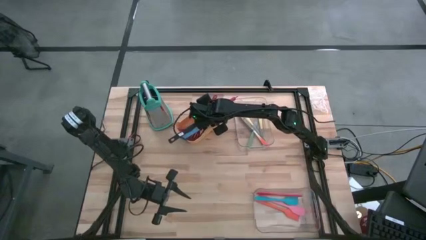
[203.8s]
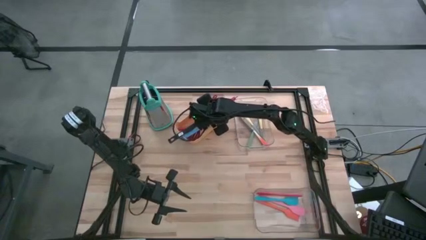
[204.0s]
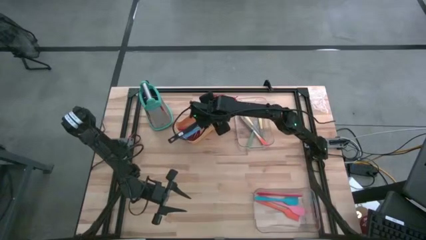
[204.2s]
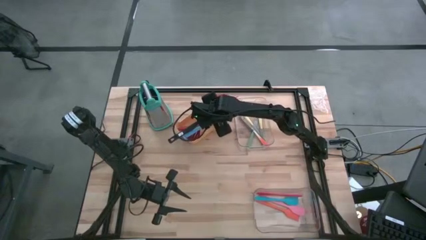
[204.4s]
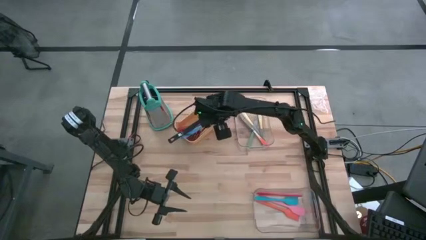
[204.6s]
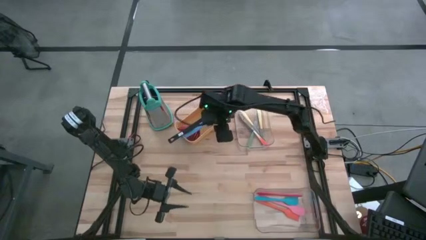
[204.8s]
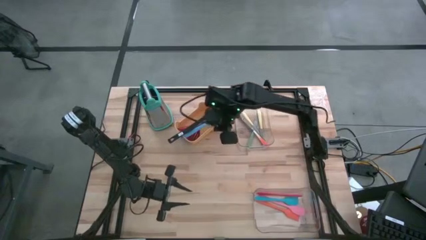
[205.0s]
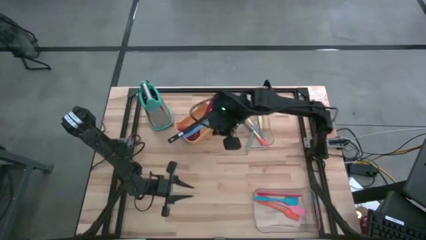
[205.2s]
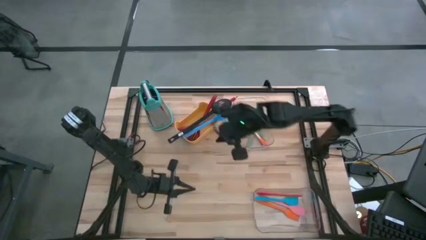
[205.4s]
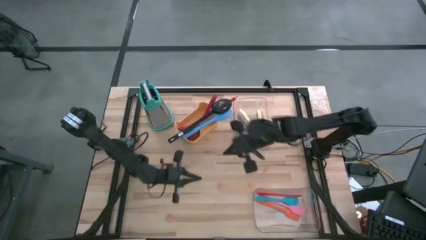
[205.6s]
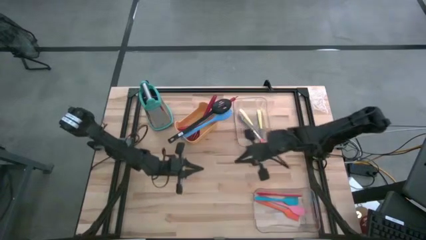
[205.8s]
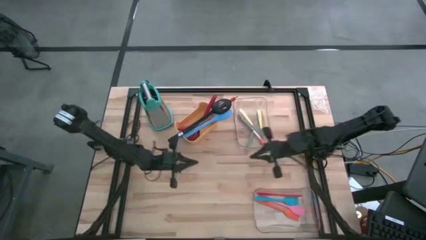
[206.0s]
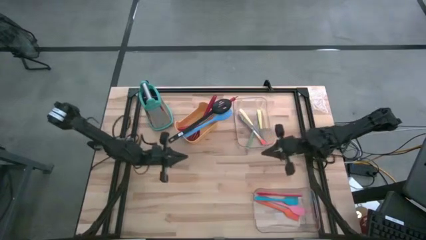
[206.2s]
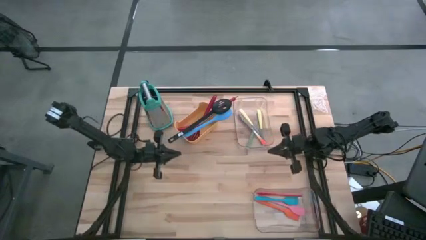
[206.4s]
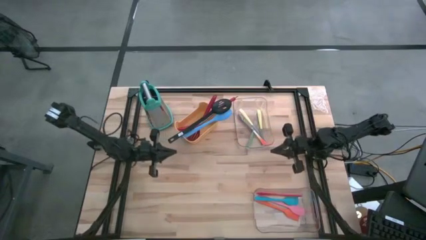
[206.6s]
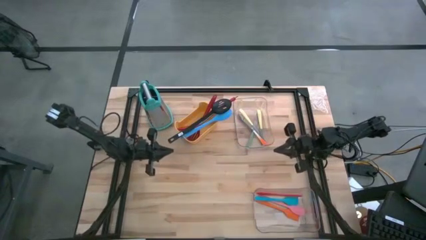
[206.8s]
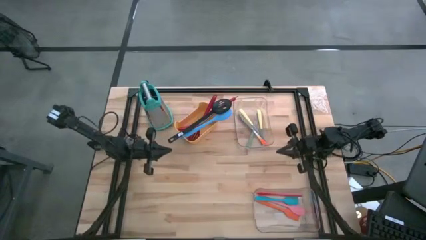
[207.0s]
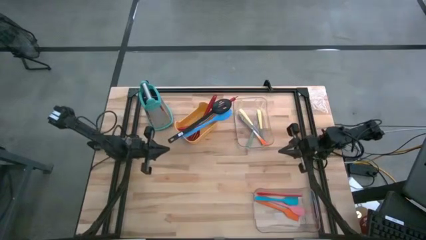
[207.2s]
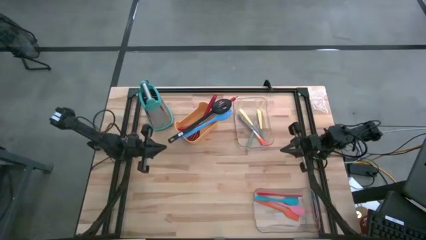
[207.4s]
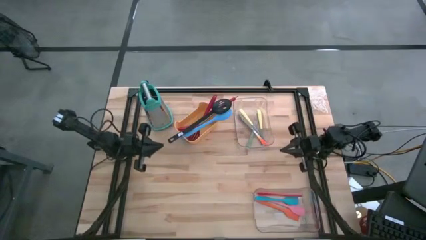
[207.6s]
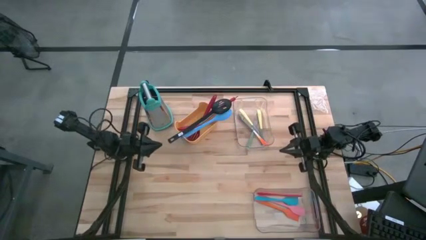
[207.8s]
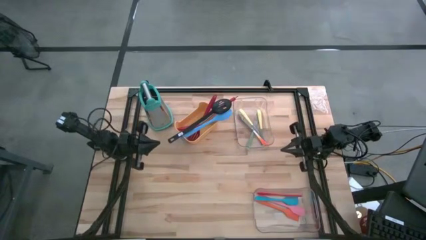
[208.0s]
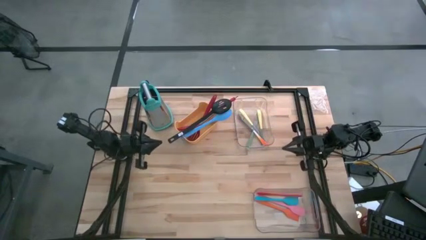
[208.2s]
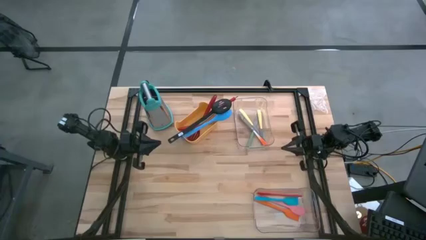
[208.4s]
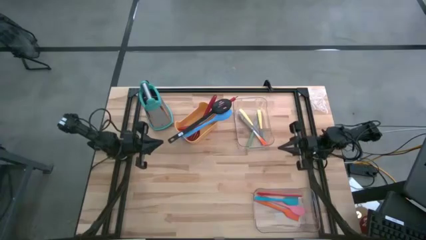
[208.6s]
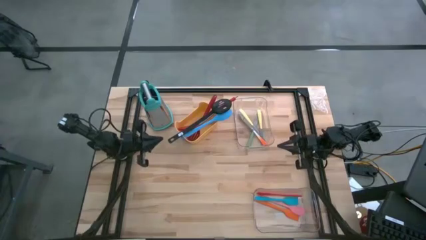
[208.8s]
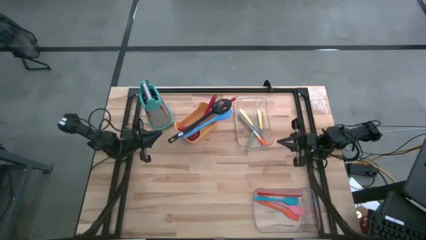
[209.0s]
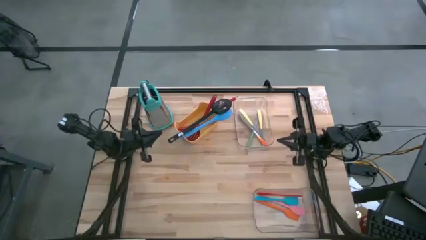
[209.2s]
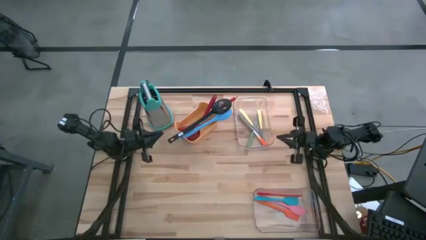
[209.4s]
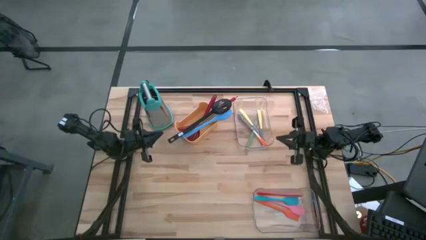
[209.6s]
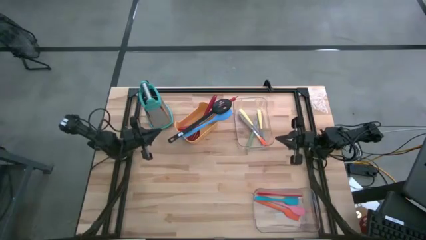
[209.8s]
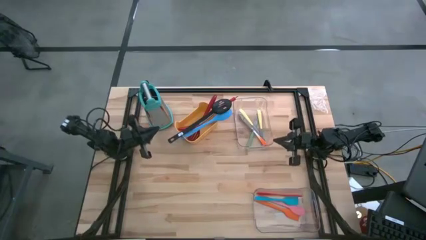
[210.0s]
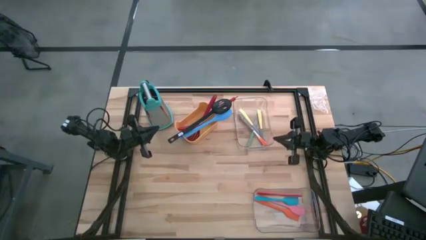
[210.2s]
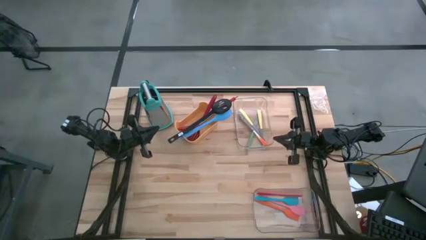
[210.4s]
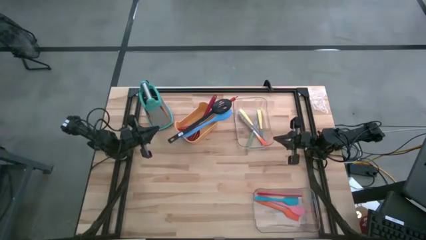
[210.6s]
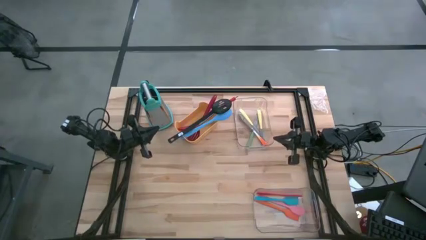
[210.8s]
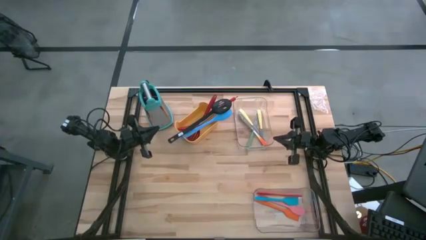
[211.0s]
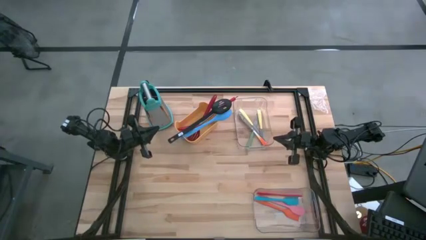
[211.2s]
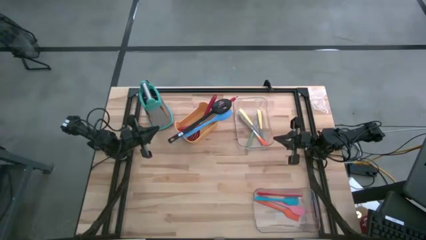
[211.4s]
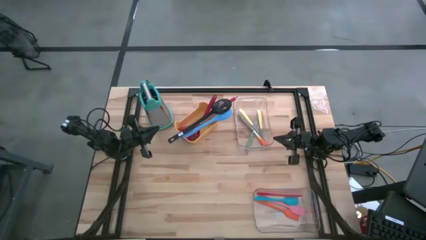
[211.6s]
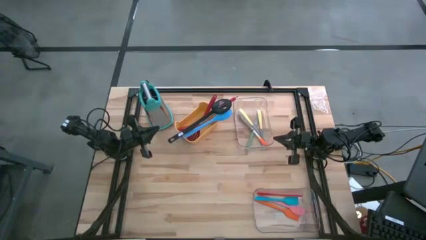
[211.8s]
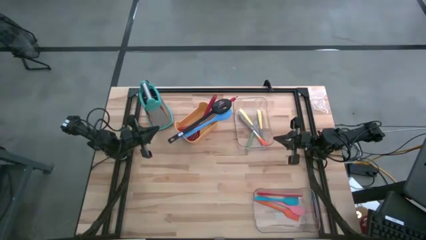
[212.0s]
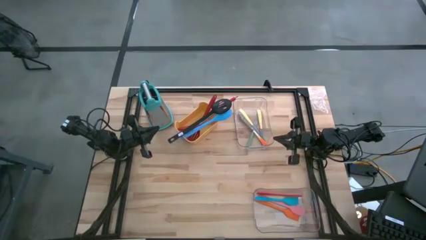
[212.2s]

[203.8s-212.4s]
Task: Pick & Place Kitchen Items
Return to Home Position

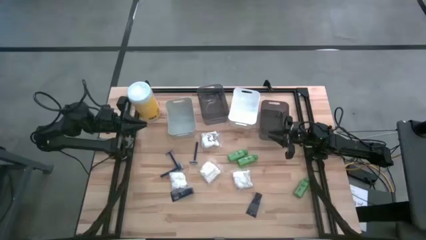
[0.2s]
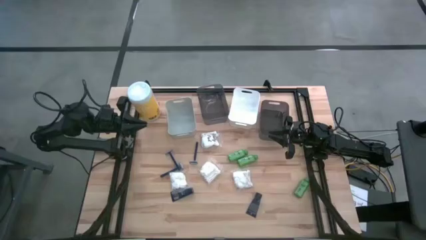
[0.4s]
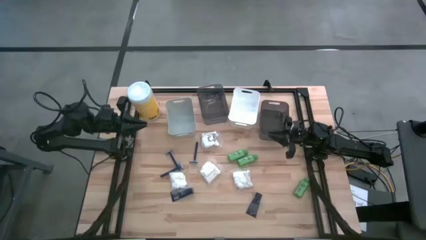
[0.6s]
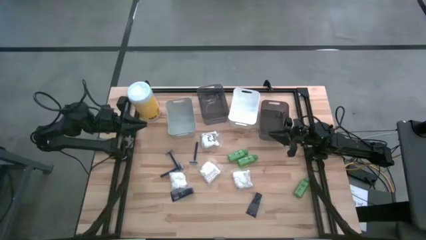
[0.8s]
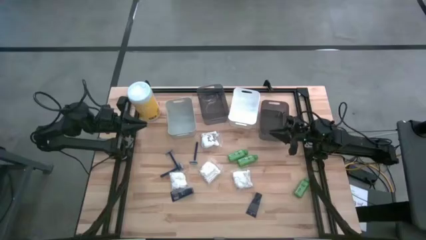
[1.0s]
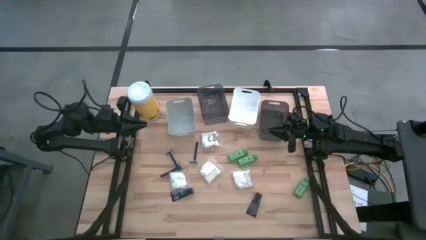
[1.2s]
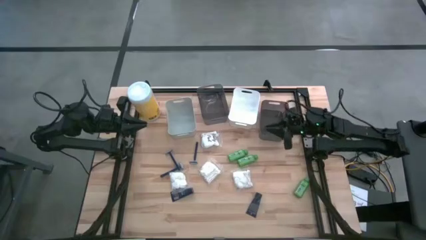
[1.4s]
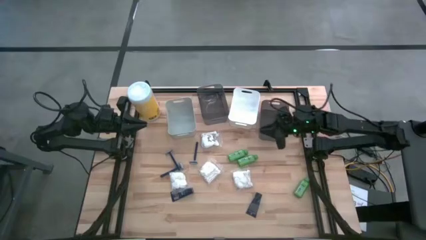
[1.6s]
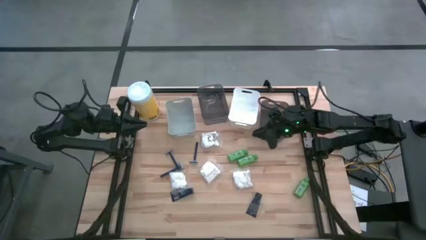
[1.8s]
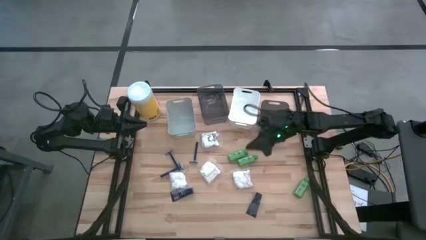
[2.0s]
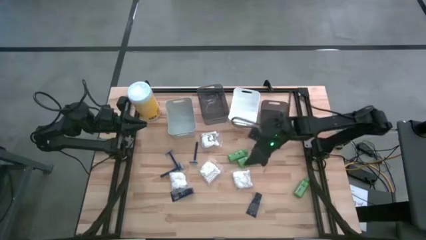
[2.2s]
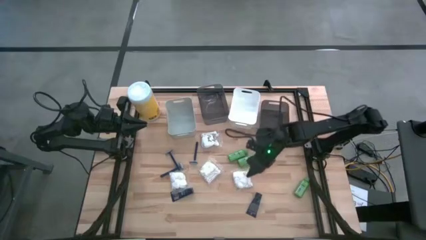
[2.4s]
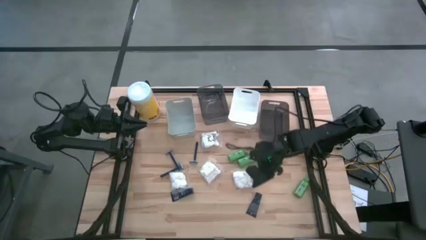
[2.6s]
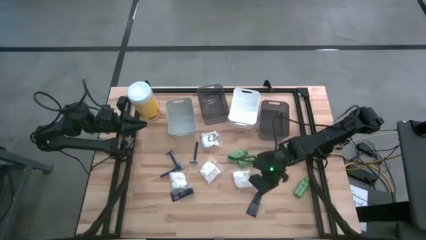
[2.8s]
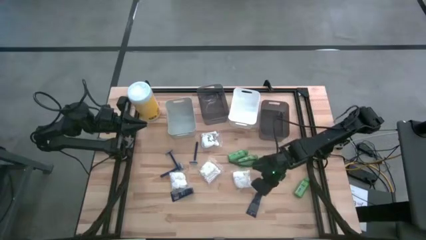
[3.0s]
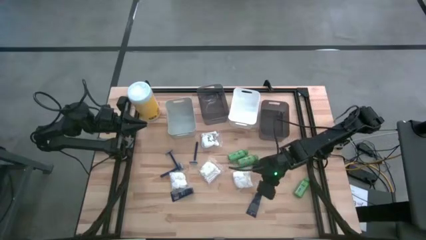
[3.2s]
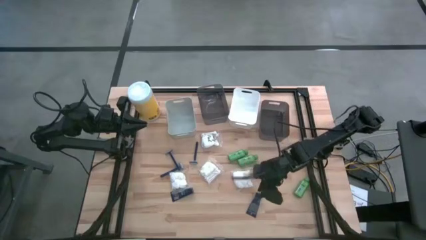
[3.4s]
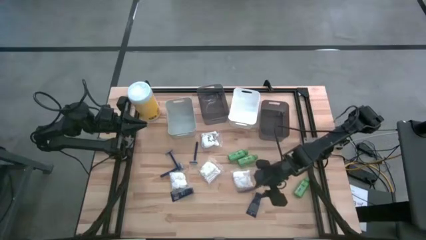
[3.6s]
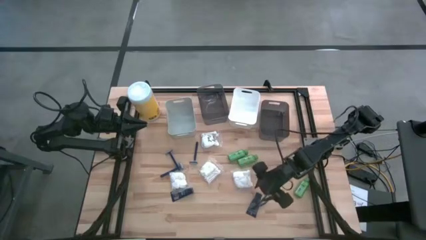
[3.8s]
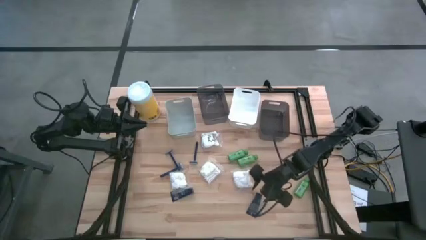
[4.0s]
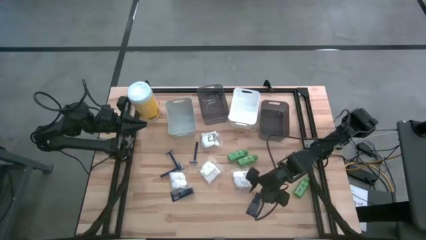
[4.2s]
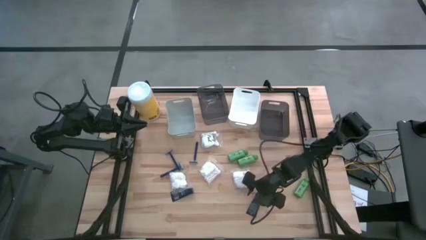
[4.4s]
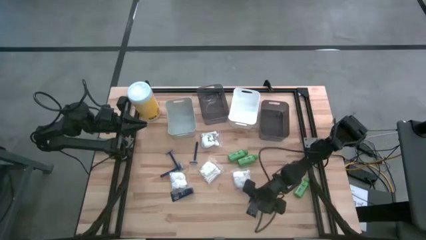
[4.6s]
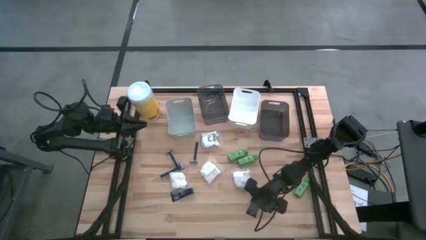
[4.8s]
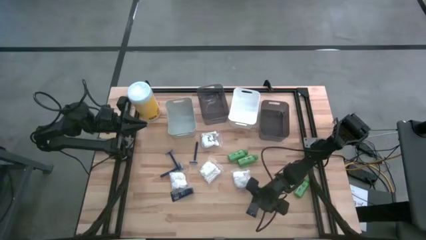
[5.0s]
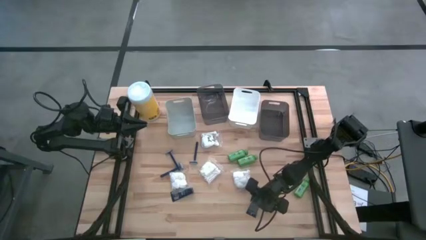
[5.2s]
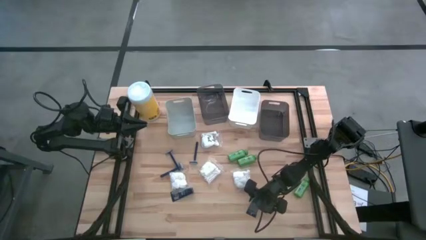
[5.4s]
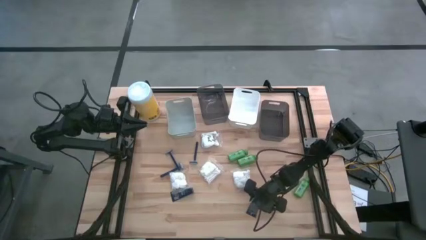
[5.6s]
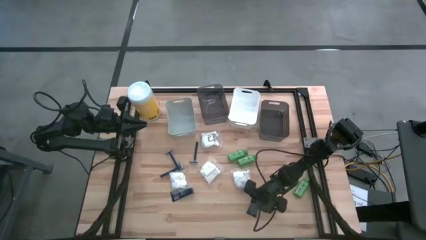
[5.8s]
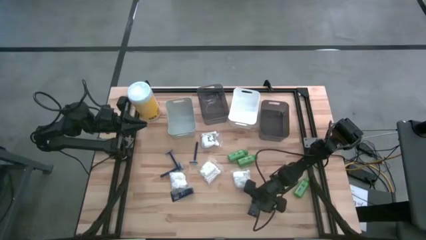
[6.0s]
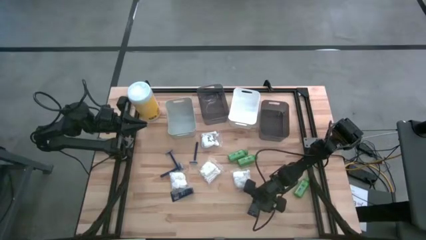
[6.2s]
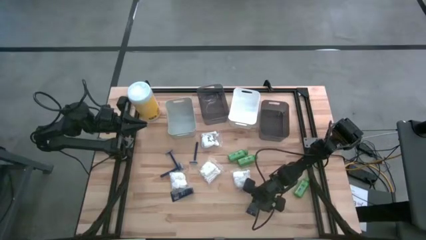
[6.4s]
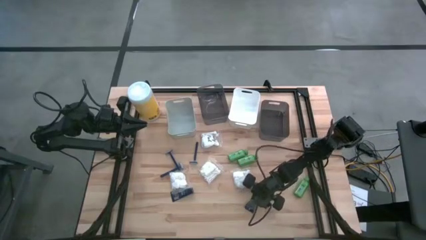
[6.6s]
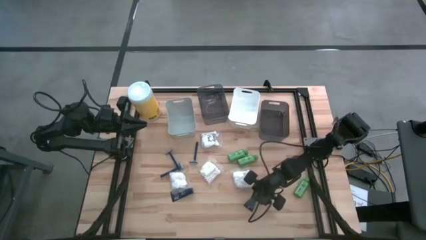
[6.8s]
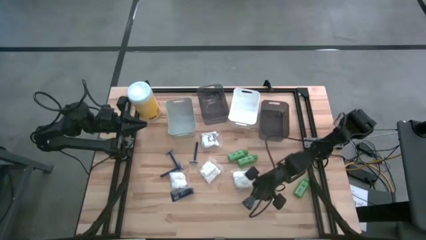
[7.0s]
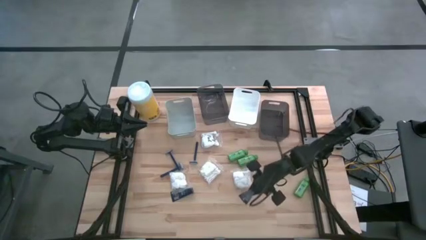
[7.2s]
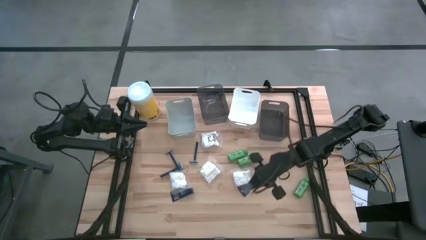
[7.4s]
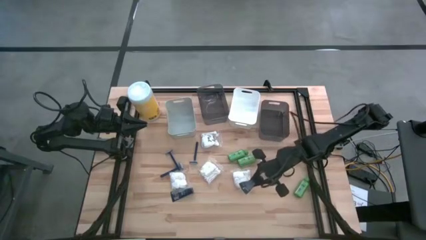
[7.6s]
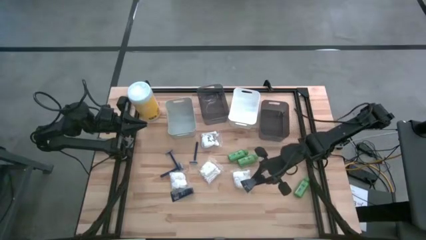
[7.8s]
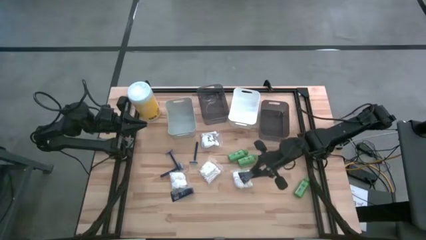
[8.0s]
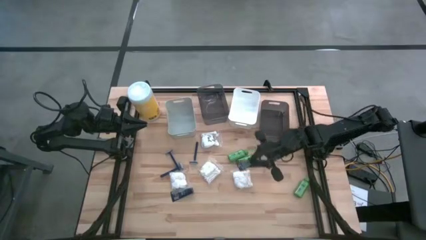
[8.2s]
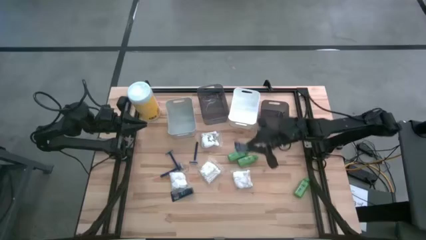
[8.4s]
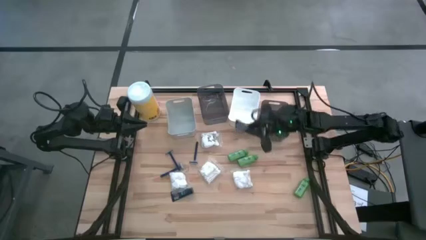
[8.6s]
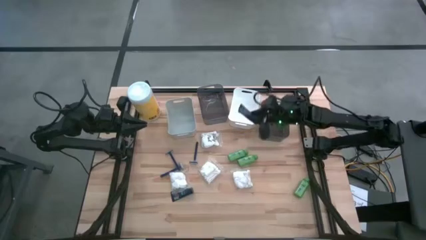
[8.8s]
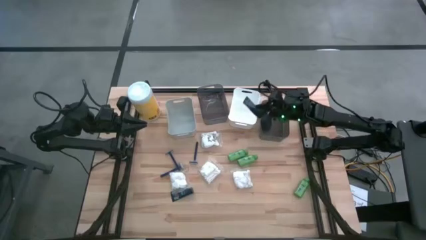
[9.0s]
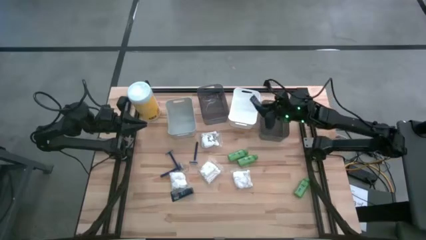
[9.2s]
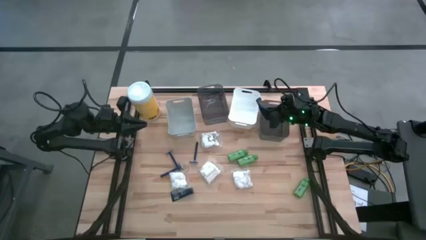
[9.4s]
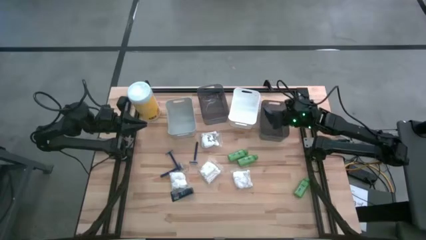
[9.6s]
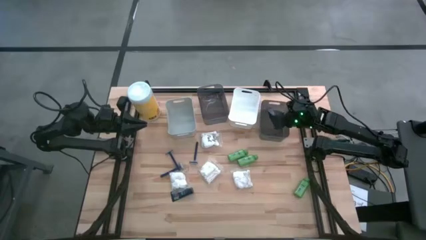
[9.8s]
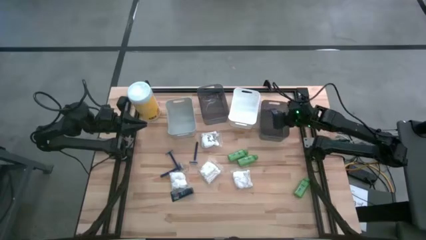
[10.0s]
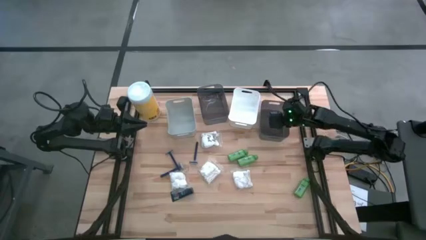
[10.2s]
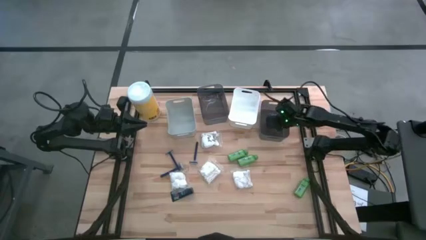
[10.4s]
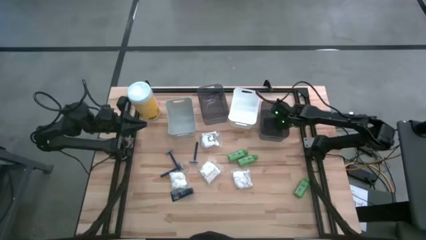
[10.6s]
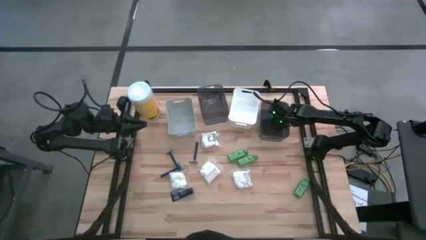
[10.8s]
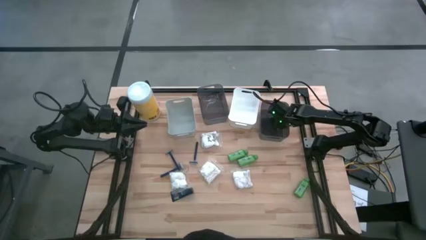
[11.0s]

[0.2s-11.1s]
Task: Pick & Place Travel size toiletries
Put the blue shave cream into the bottom black bin
